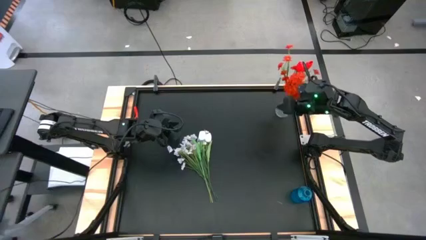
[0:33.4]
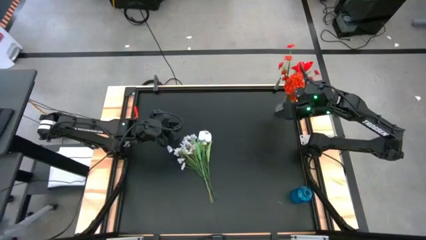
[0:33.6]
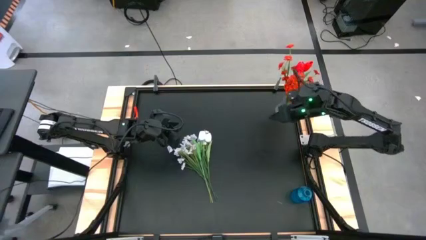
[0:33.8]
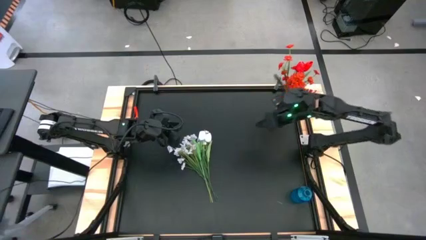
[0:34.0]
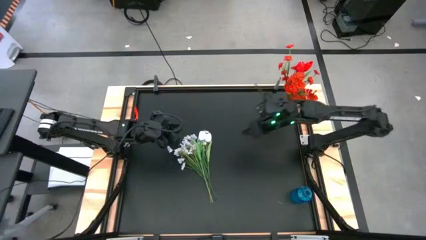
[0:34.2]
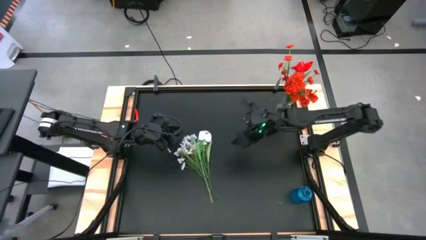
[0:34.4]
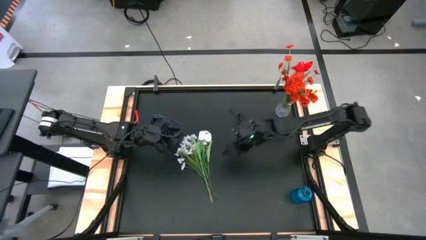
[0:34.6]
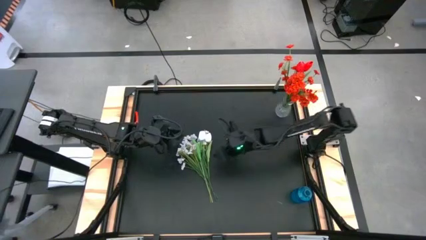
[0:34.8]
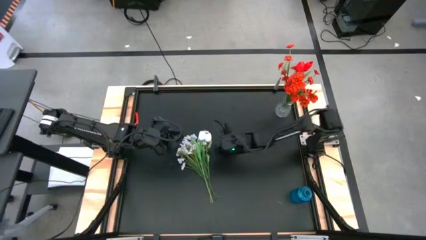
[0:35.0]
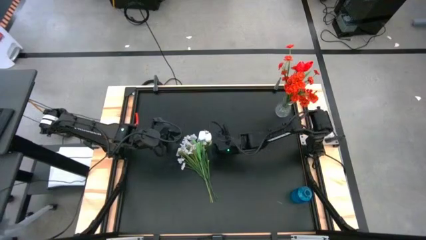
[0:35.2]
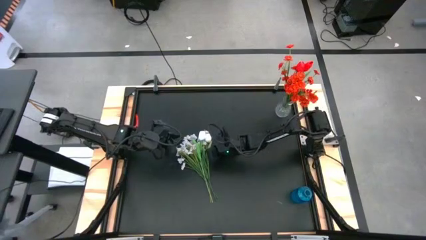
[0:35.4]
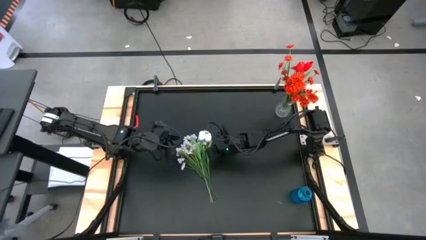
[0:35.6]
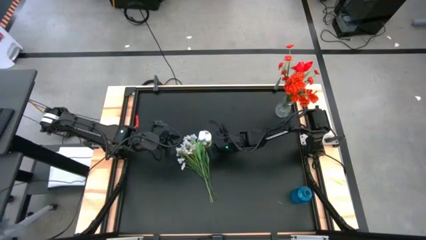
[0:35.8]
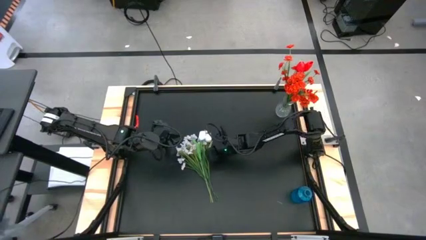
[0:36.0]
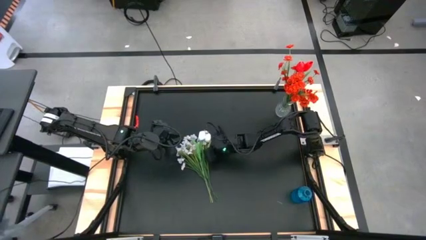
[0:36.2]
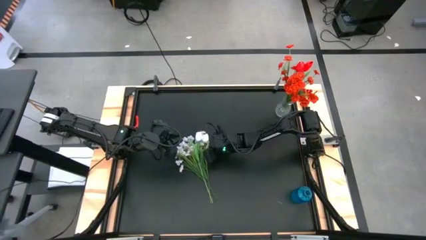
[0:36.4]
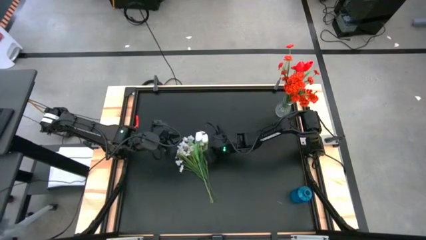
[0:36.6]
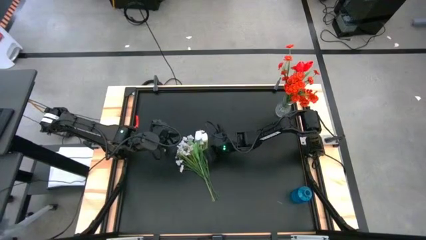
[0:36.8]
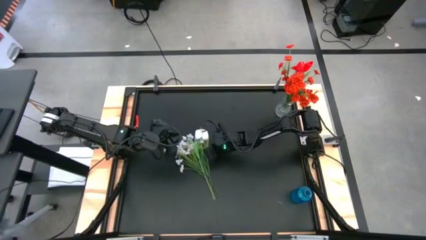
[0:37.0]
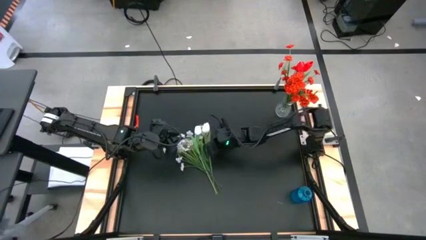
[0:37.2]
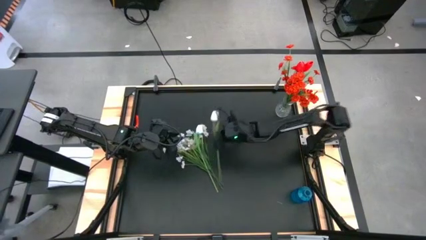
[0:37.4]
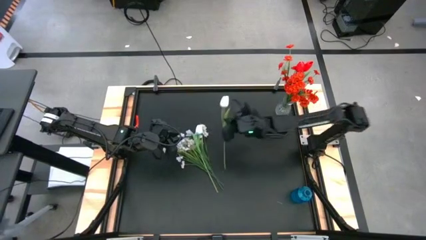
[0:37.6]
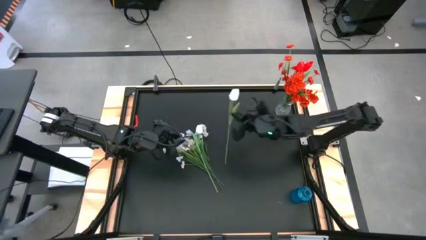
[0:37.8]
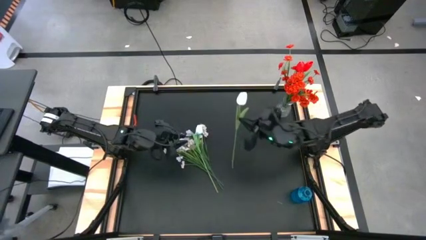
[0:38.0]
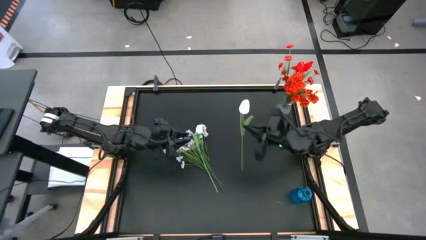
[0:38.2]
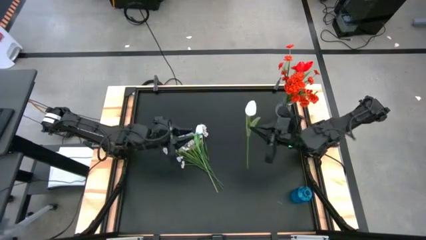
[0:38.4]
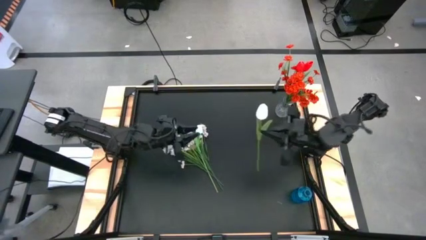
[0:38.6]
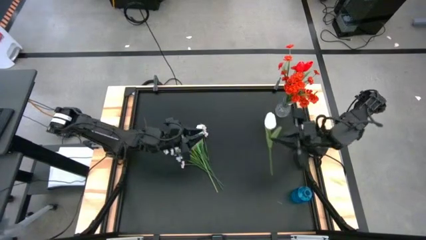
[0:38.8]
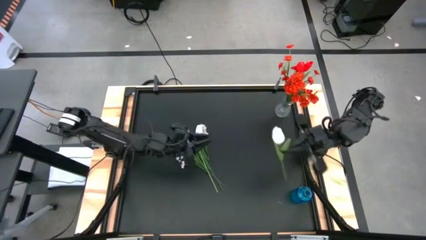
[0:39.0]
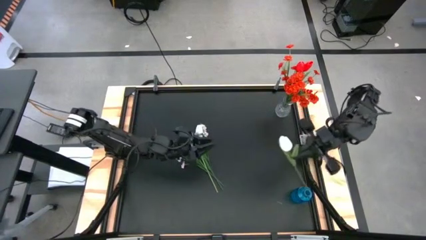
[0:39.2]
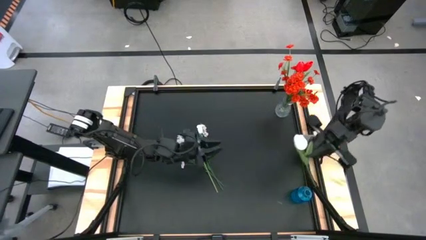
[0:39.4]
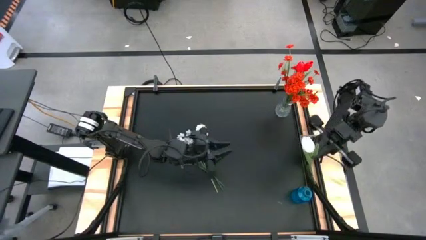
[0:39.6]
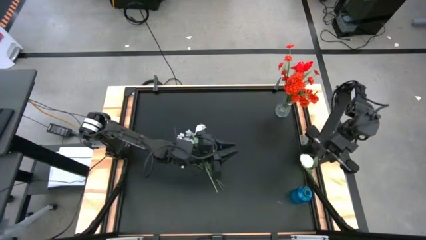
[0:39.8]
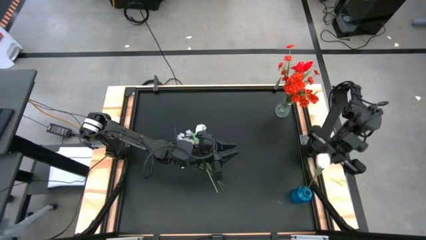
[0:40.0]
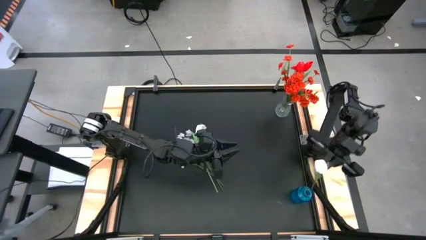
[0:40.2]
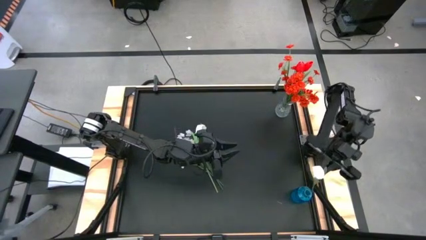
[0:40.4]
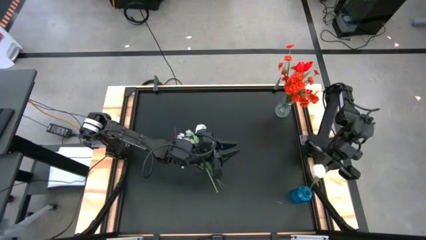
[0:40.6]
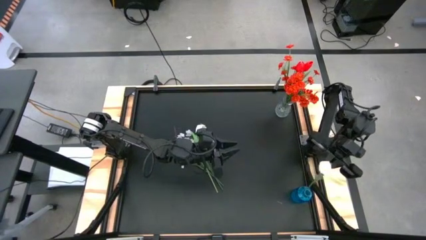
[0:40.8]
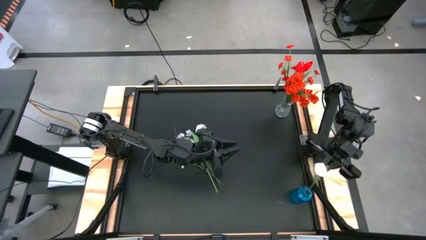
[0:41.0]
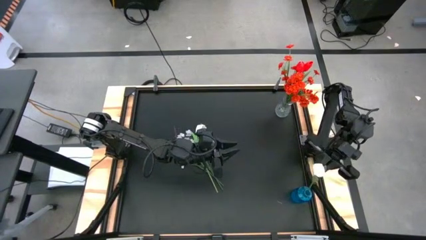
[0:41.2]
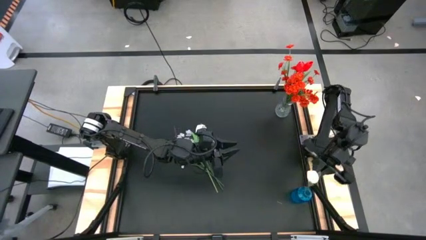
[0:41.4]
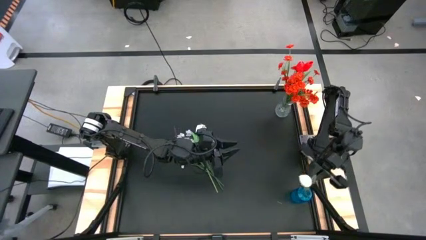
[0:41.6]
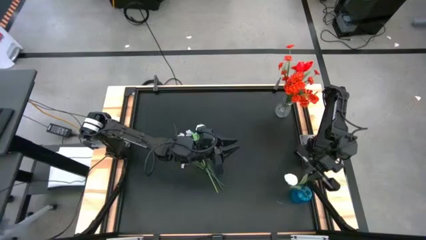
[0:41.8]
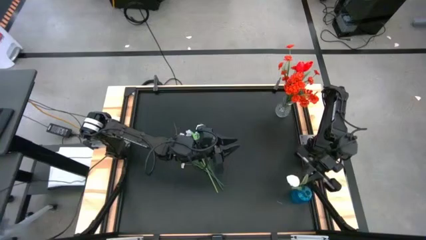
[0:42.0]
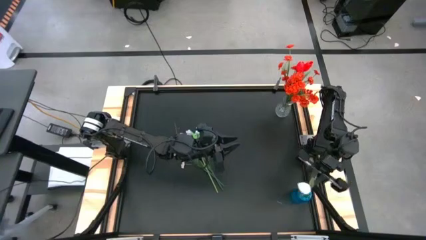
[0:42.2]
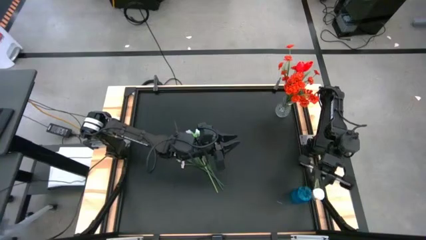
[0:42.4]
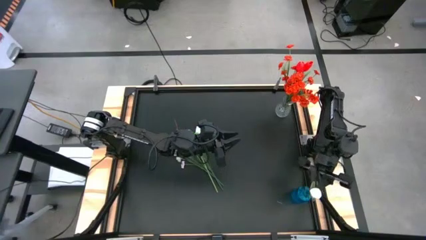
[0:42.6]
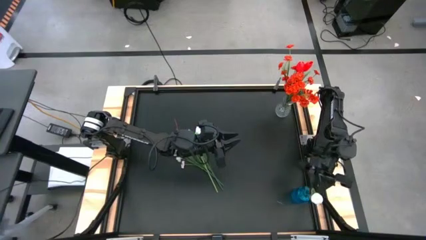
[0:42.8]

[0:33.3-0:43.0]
Task: Sort flowers into vase by color
Put the right white flower into the blue vase

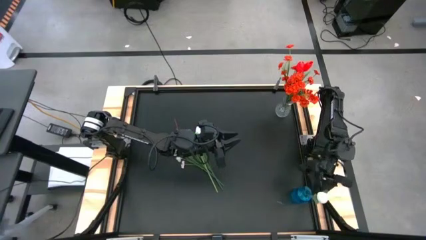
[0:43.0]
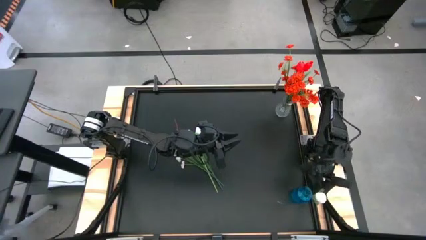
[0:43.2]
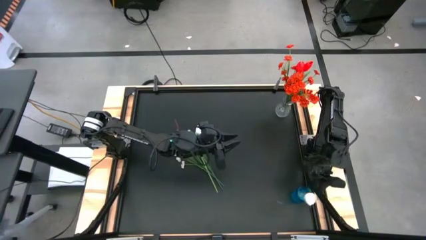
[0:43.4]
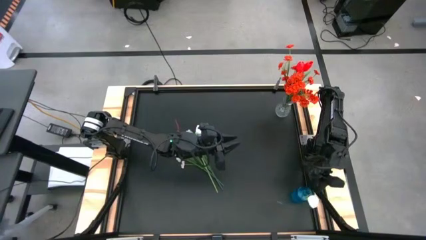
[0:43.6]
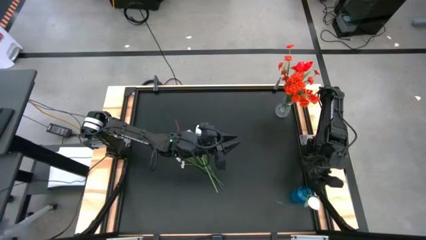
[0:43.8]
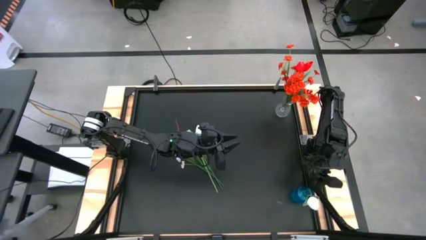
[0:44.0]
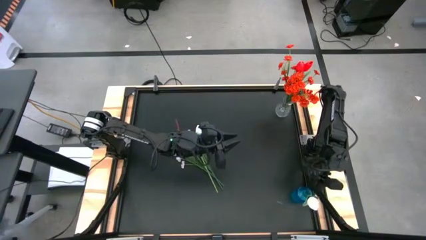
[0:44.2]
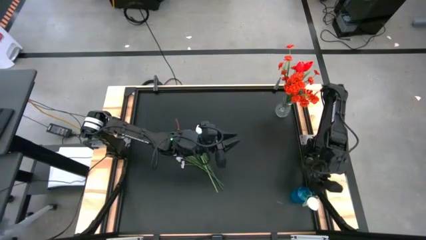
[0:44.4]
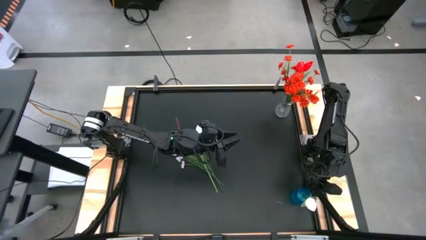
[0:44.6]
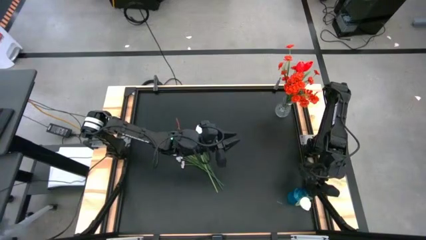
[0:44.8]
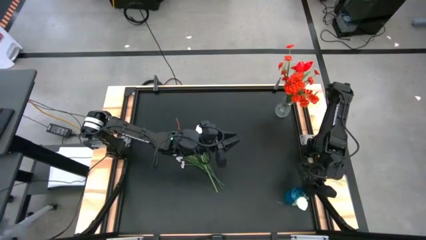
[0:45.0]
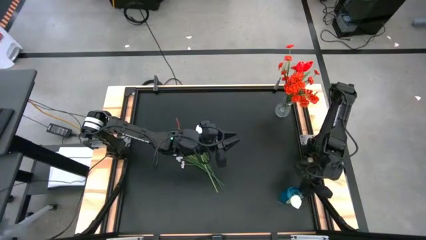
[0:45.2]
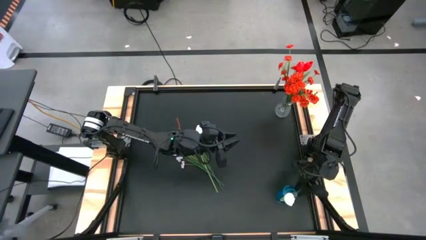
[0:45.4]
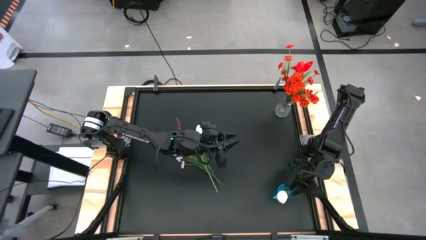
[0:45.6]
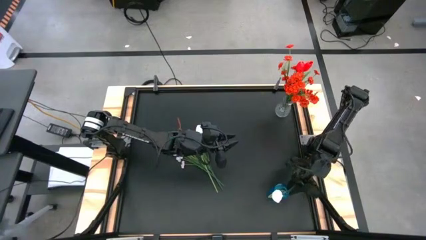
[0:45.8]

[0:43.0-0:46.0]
Move the blue vase to the left

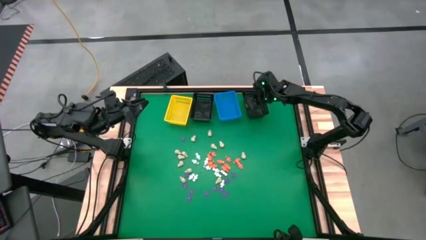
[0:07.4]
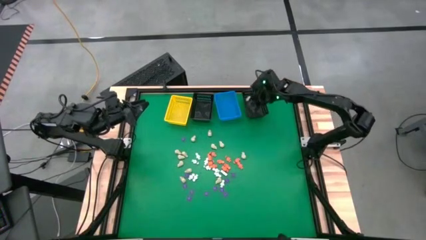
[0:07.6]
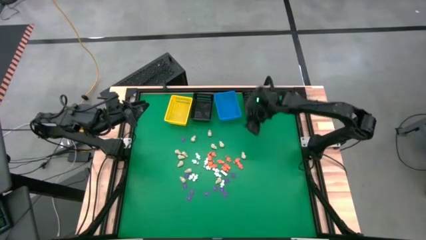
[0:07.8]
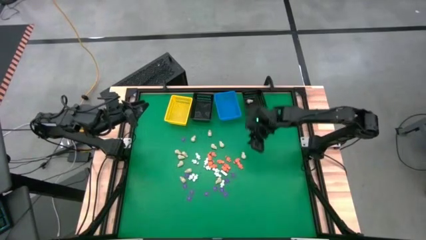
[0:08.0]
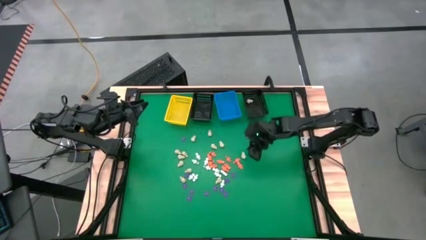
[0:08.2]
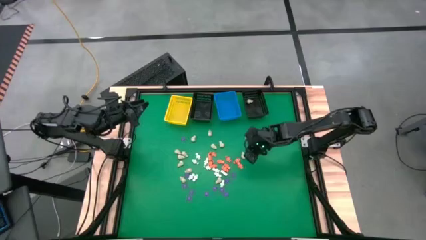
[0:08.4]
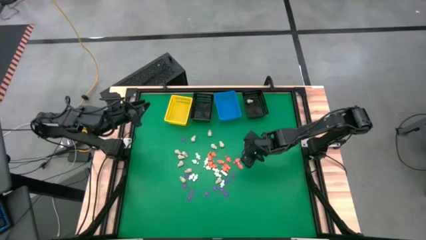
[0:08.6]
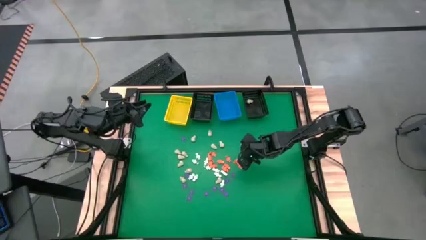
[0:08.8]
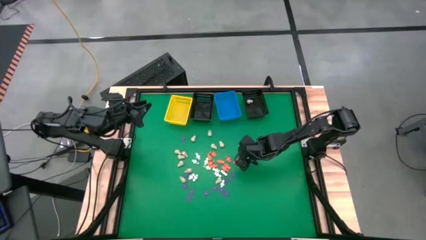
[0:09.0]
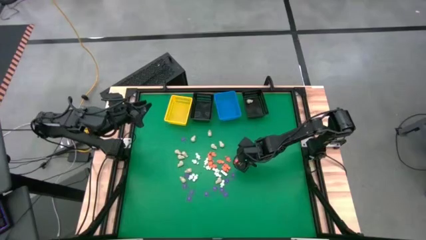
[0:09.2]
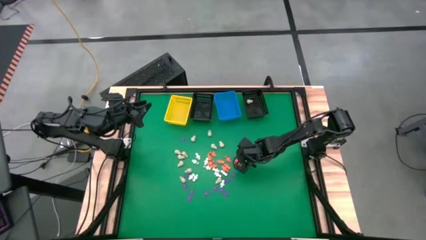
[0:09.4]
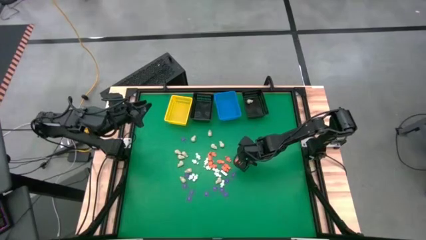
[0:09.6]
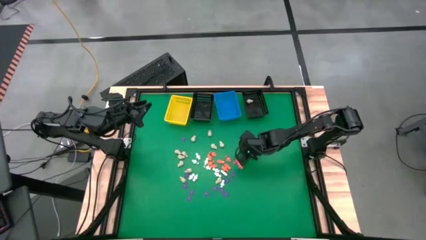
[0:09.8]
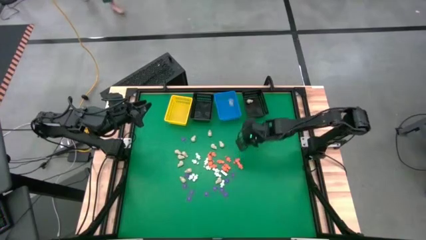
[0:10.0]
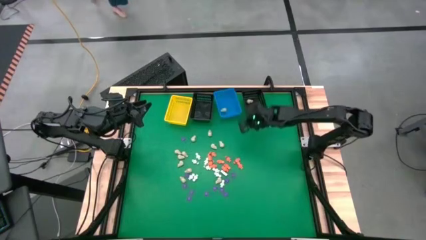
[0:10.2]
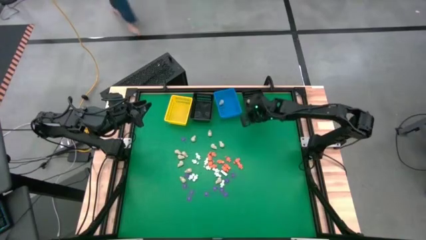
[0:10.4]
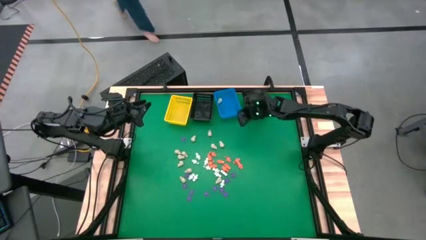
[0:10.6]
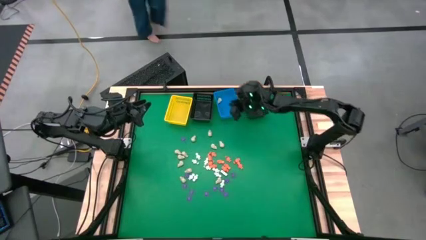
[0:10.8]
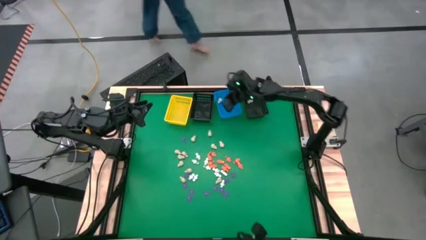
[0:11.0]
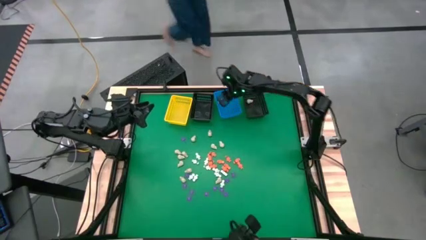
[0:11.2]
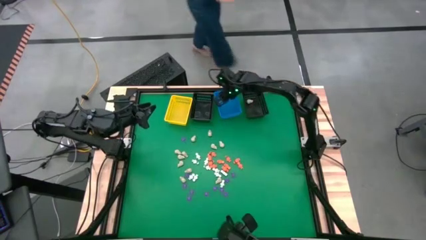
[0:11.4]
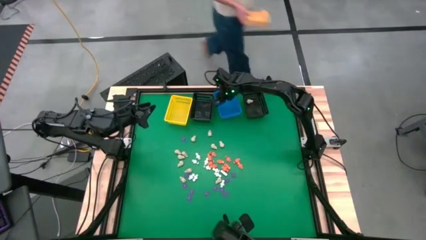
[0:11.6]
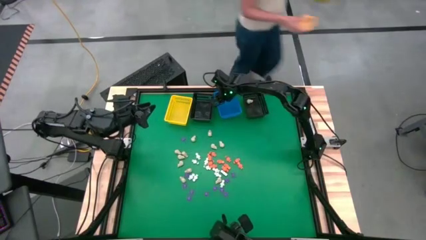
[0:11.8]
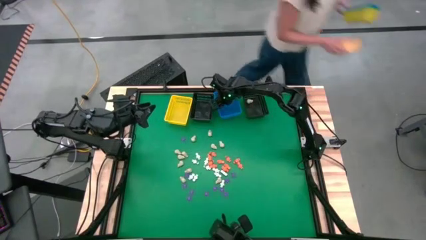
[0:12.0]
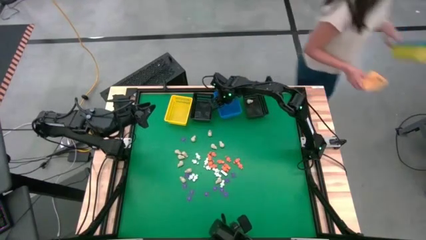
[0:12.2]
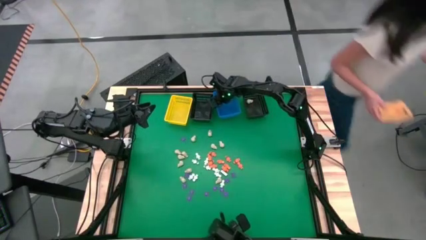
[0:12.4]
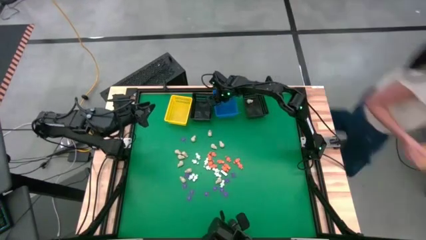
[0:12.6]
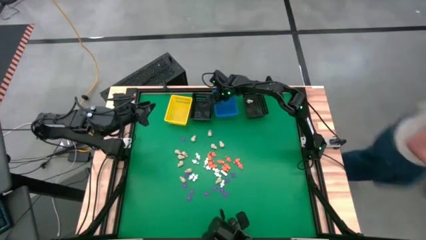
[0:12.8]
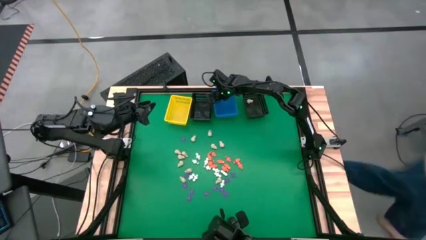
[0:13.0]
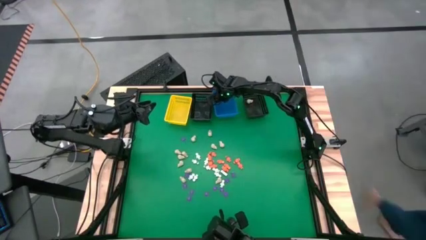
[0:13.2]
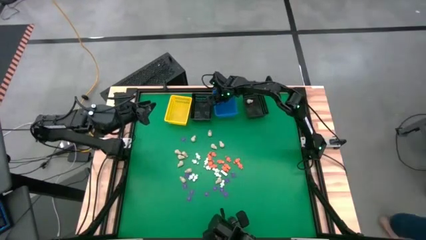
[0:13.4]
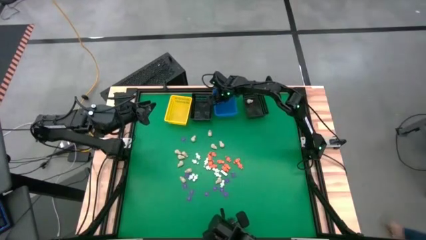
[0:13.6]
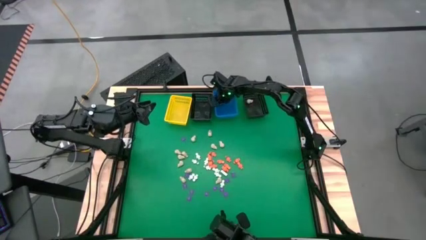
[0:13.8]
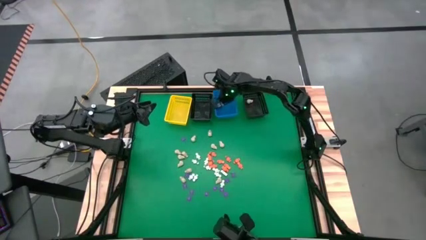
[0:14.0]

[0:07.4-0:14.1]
Task: Sort Halloween decoration
Put the white skull toy into the right black basket
